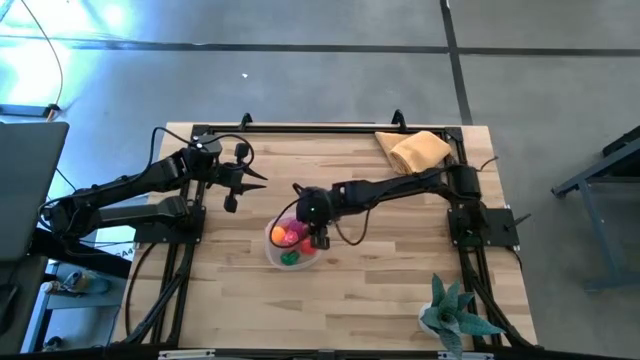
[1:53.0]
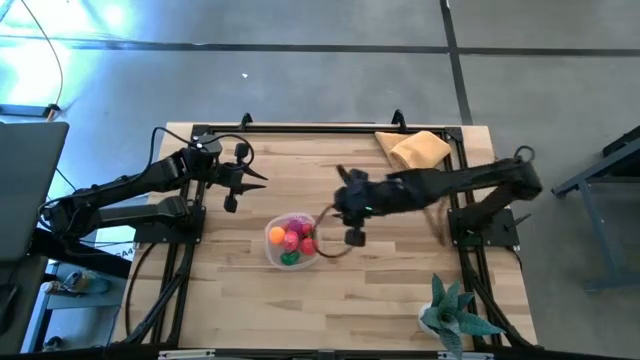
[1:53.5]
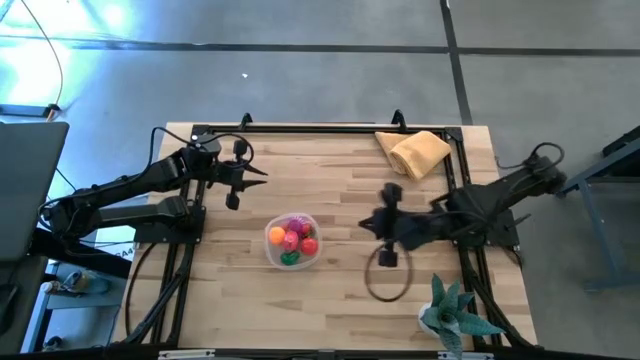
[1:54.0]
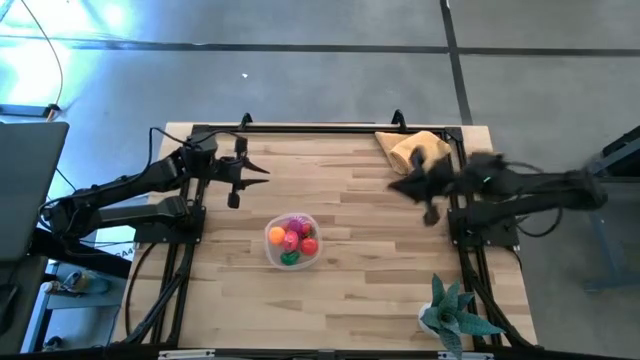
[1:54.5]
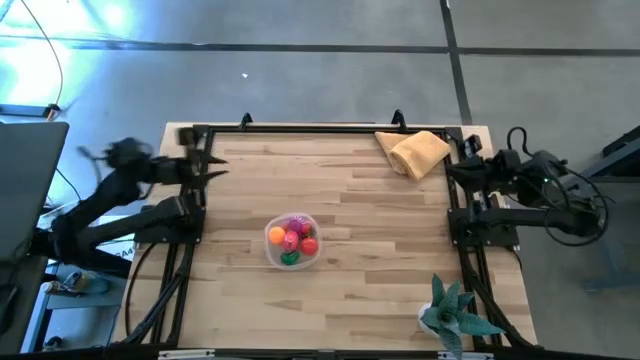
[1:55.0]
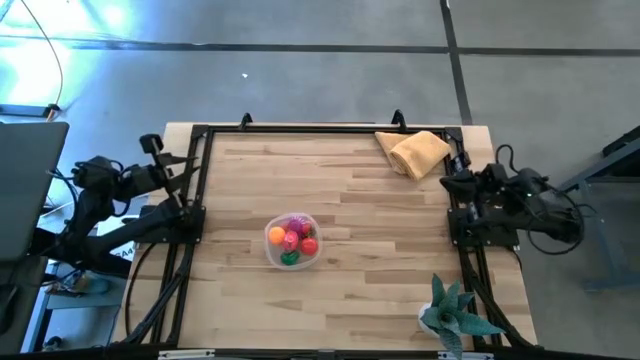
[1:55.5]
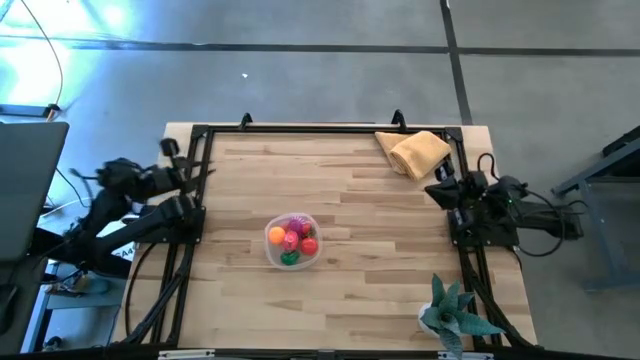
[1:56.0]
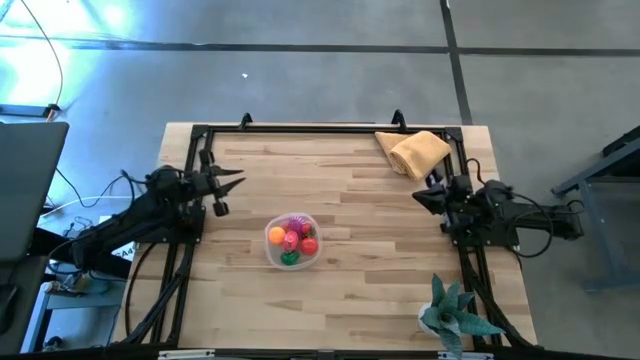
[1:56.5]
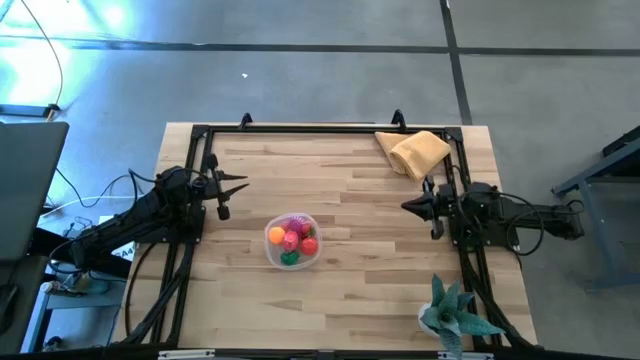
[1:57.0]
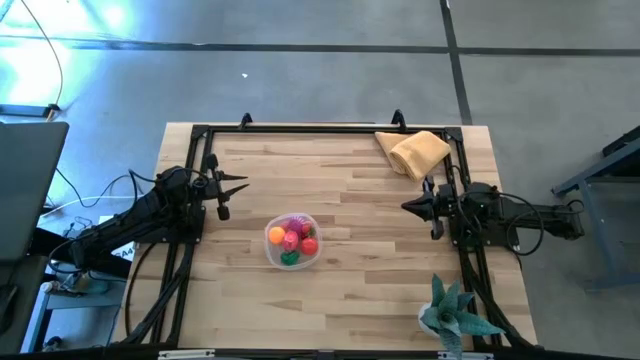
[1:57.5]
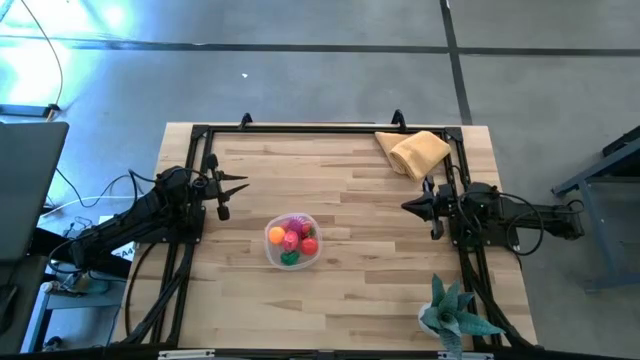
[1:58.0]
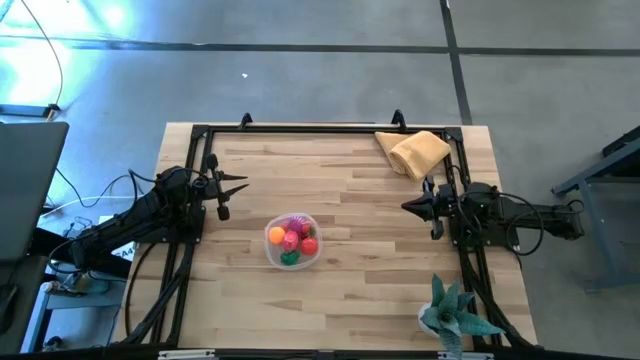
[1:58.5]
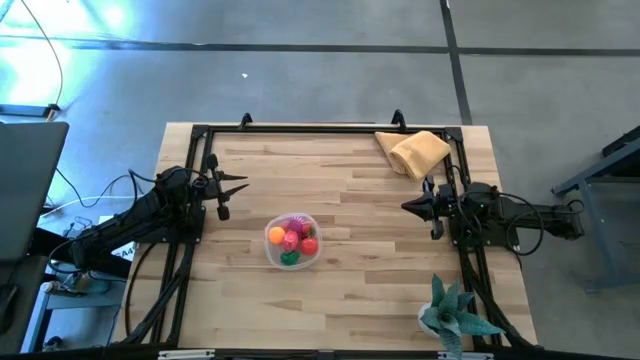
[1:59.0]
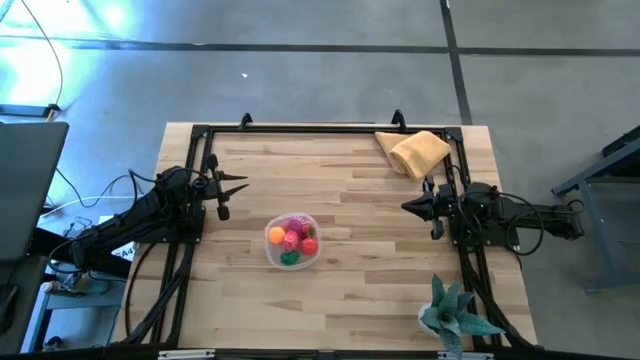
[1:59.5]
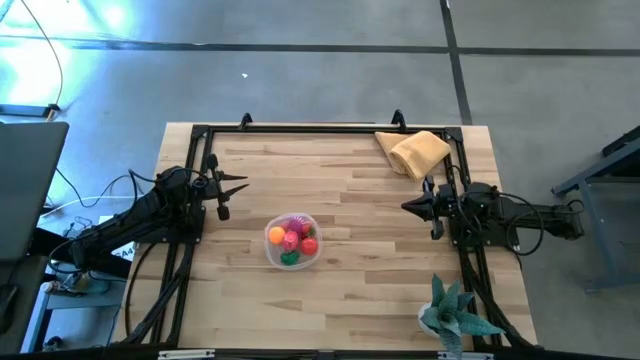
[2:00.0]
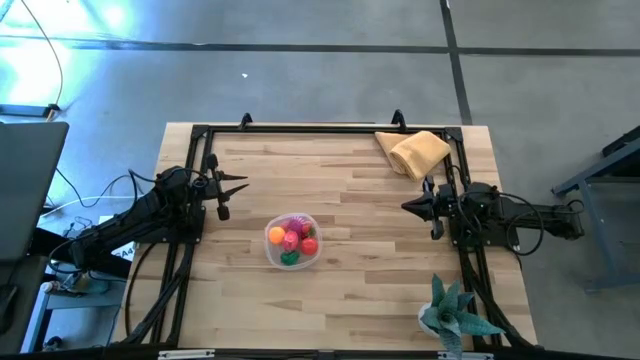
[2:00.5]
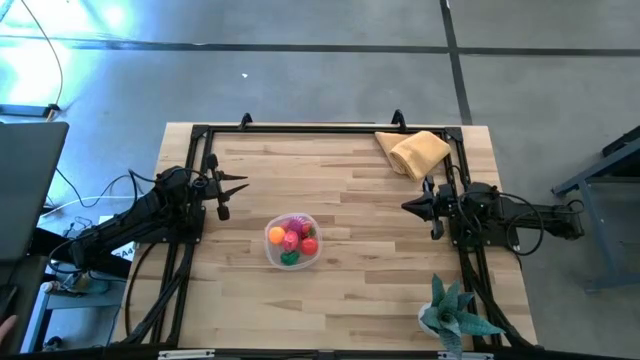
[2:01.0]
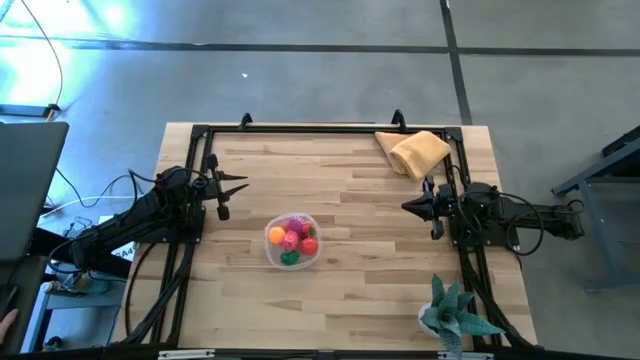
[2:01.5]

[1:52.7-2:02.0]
Task: Pick and placing Produce into tupperware
Return to Home Position

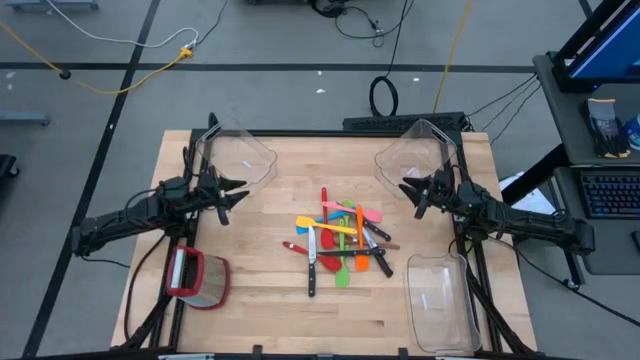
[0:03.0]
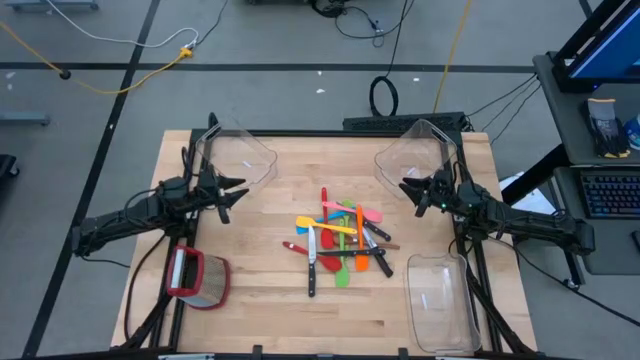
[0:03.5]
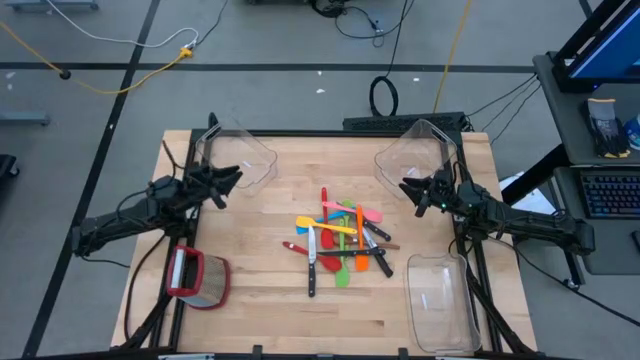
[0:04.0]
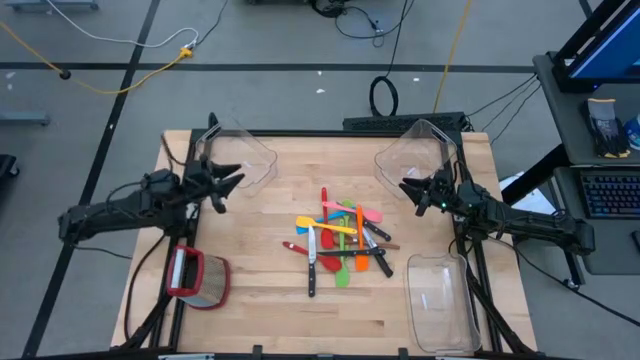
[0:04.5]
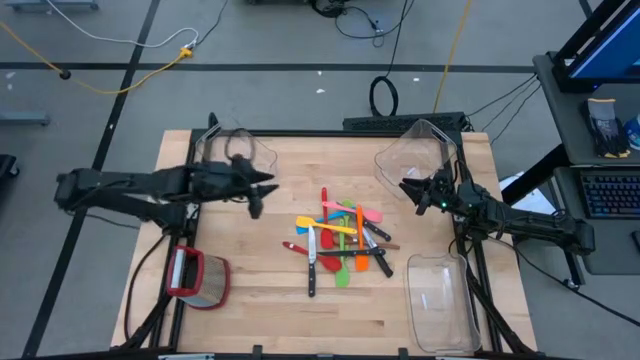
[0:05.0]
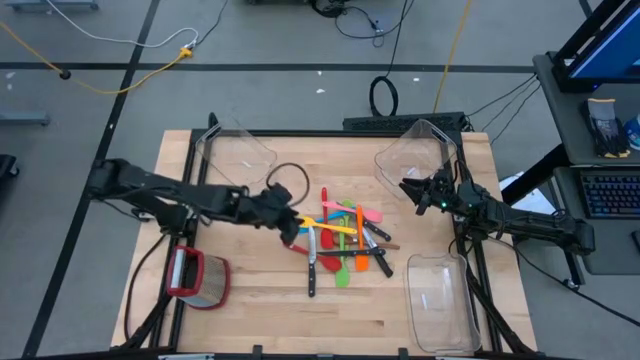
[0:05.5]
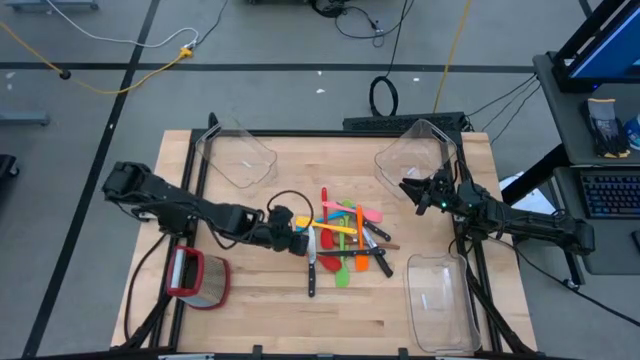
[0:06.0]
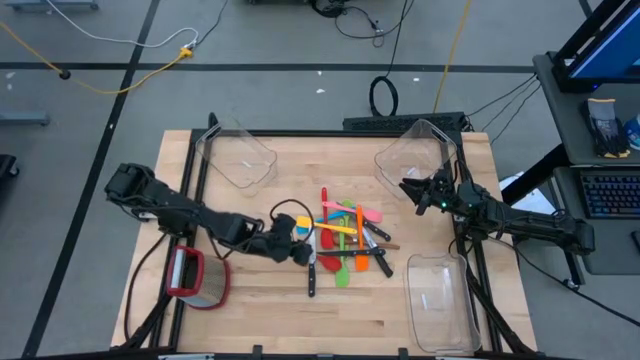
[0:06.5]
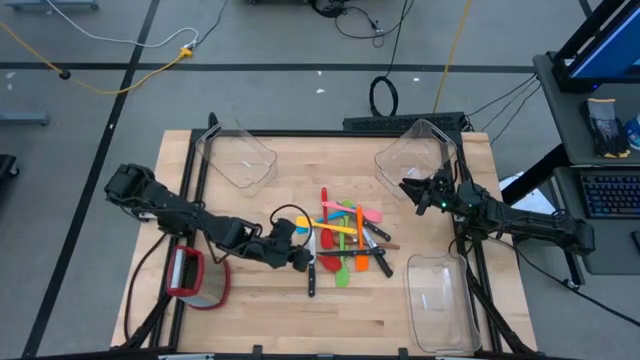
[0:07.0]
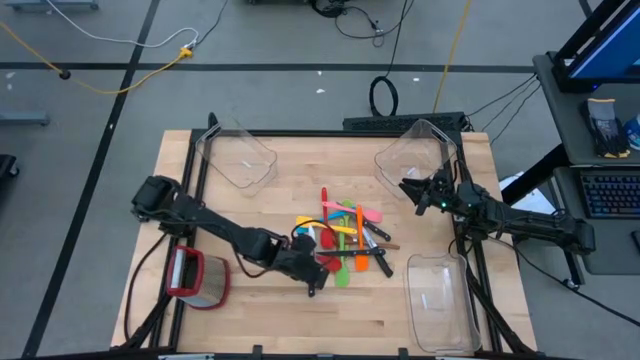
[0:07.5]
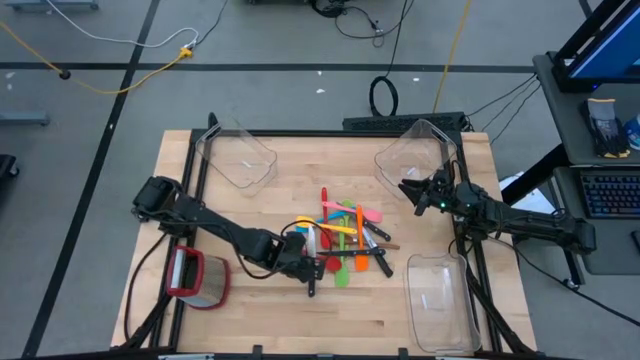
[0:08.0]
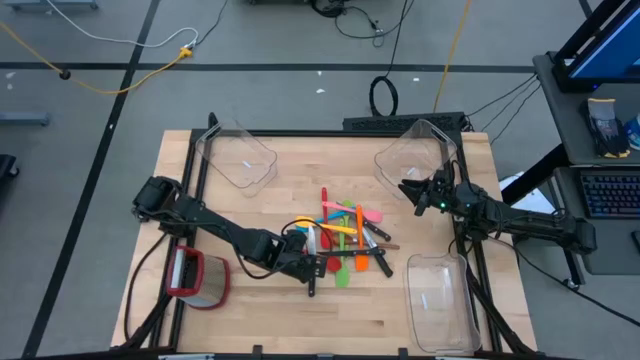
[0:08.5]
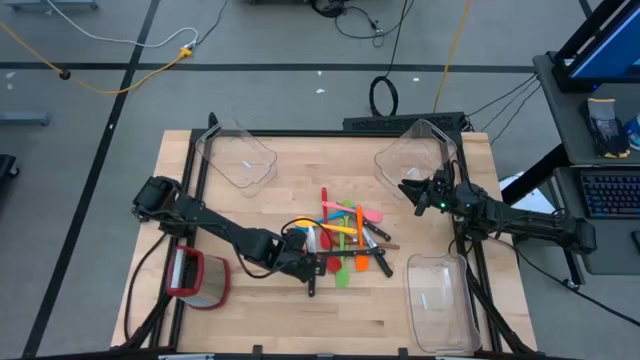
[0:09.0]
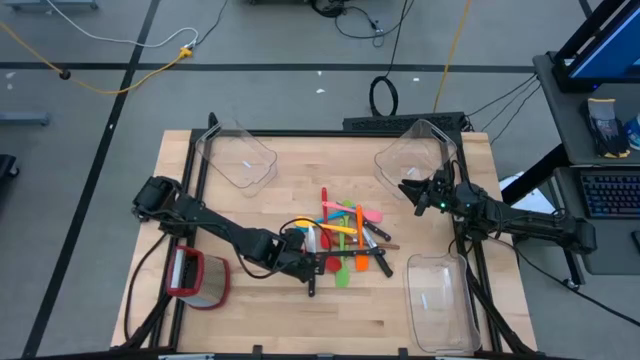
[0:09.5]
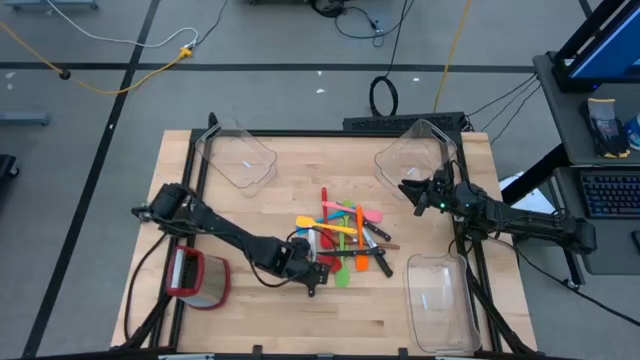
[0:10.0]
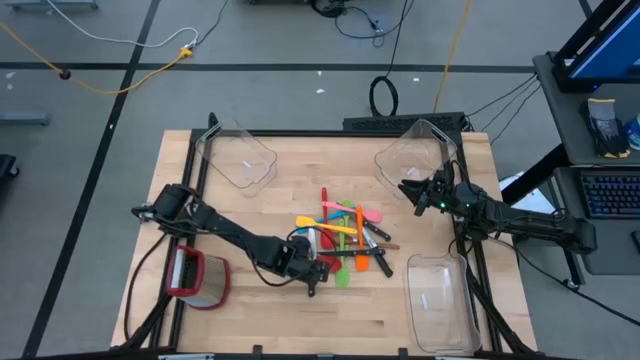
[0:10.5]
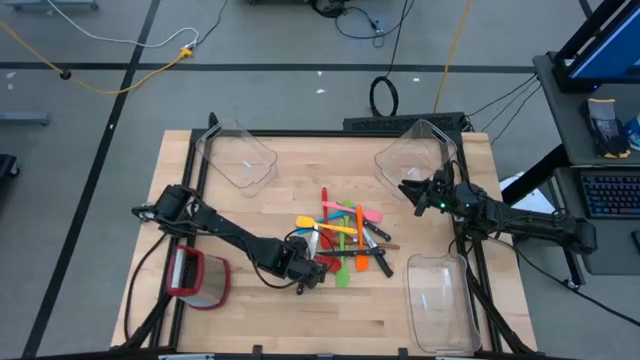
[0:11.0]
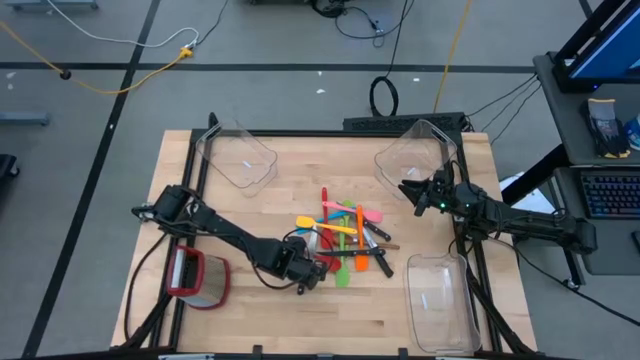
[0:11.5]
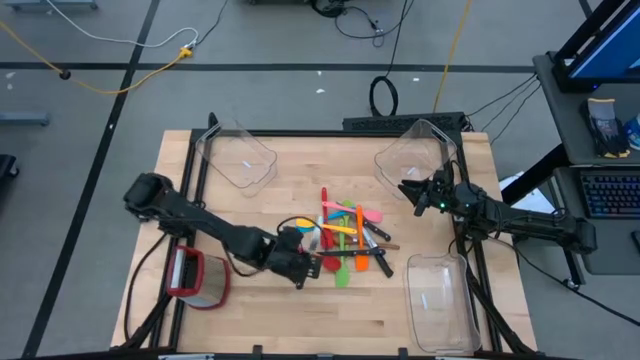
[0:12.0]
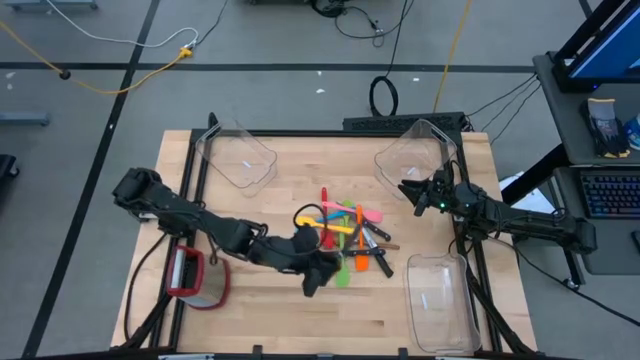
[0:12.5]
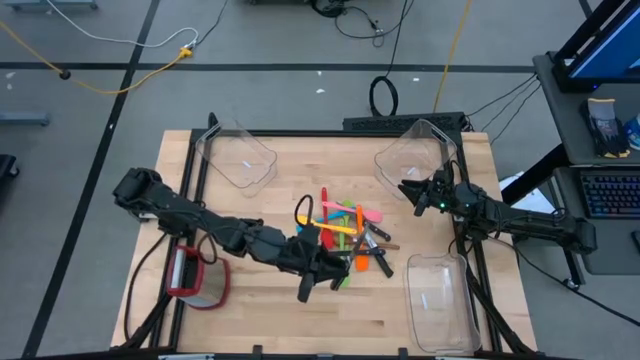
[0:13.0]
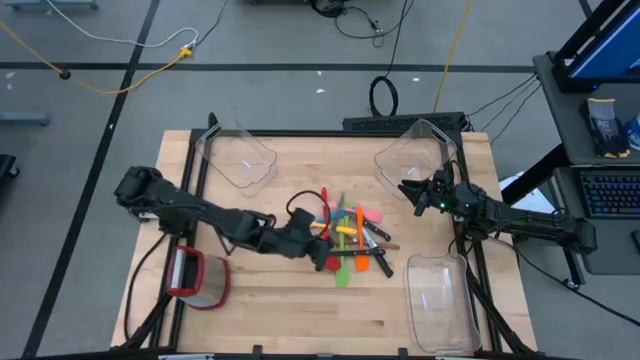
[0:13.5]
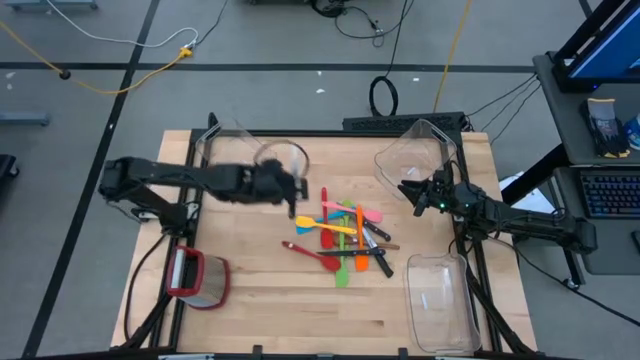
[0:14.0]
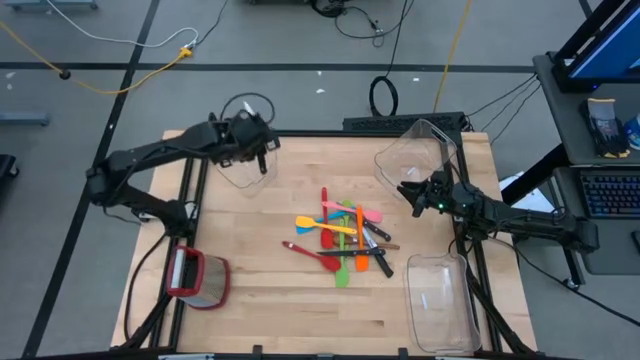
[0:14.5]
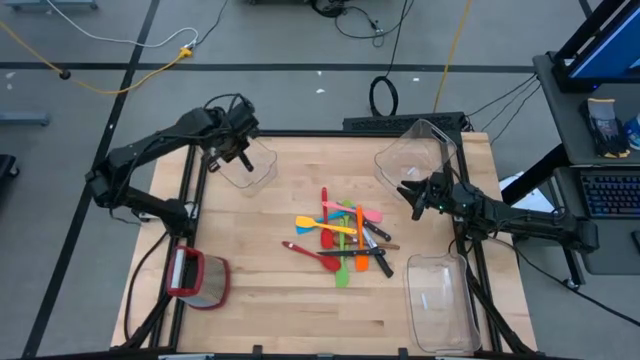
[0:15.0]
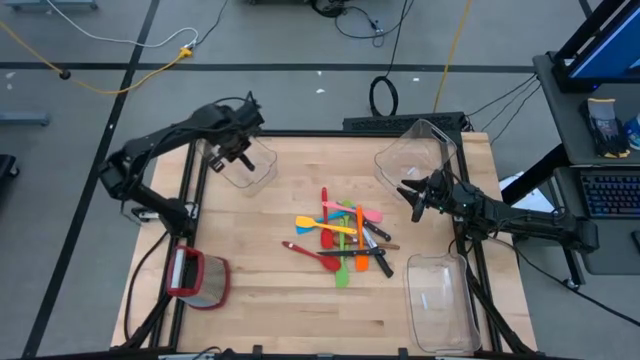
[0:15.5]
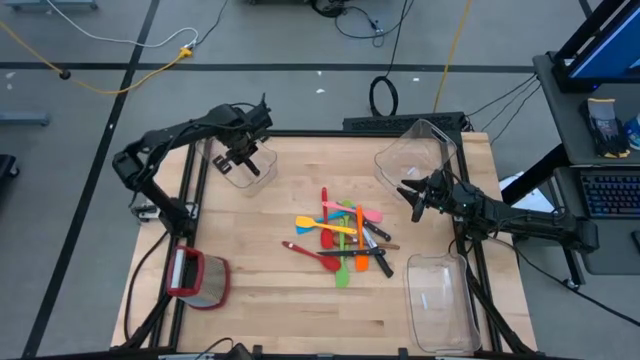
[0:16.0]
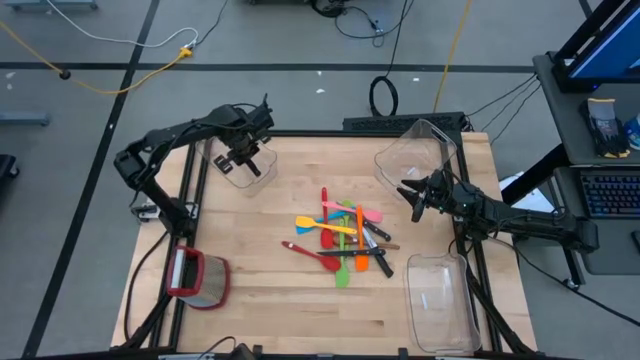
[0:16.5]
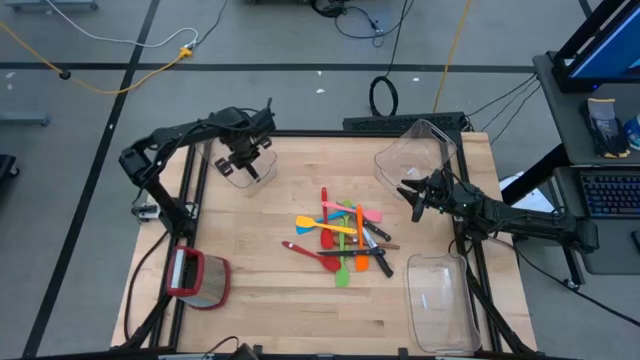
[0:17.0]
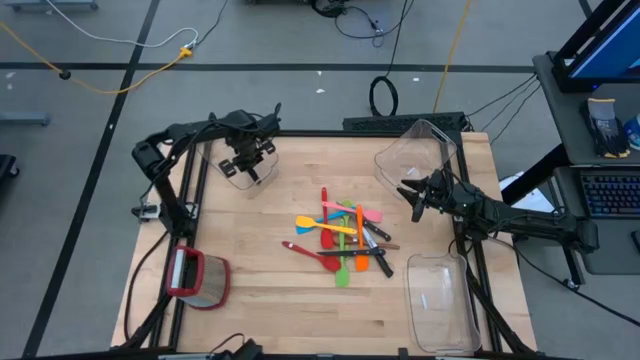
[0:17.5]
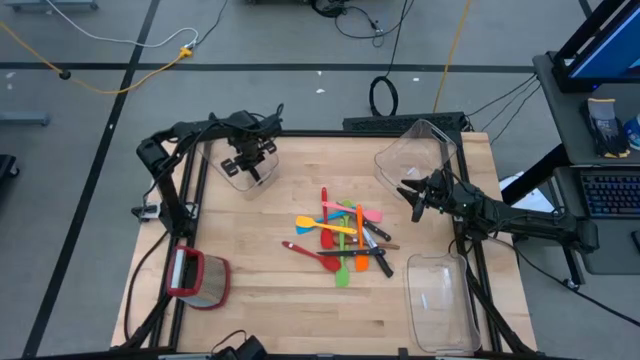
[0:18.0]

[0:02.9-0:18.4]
Task: Pick & Place Kitchen Items
Put the black kitchen knife into the top left transparent bin
